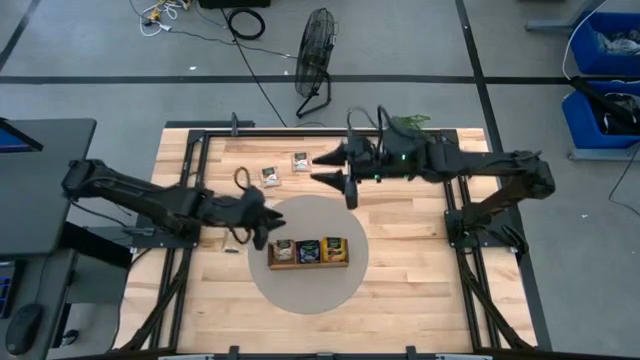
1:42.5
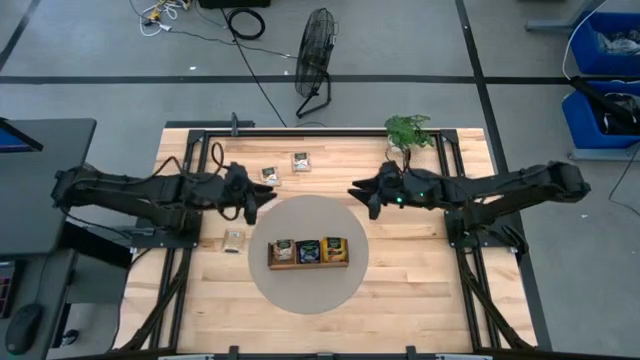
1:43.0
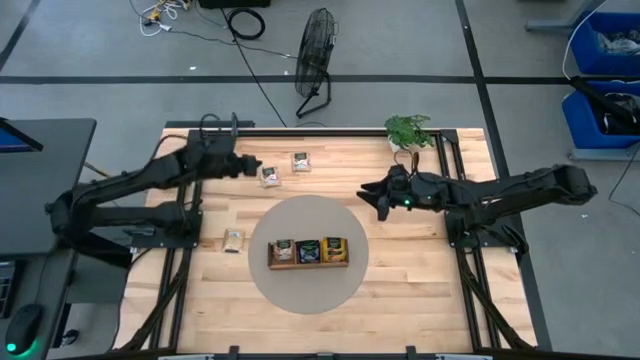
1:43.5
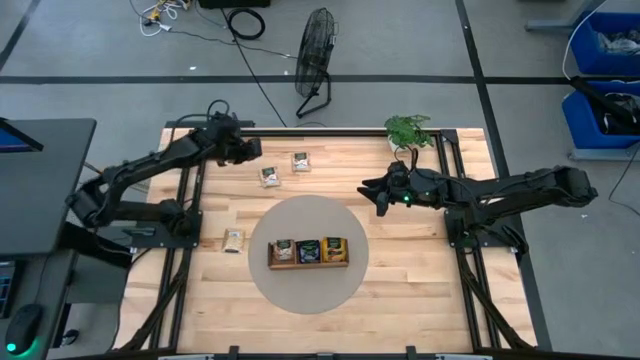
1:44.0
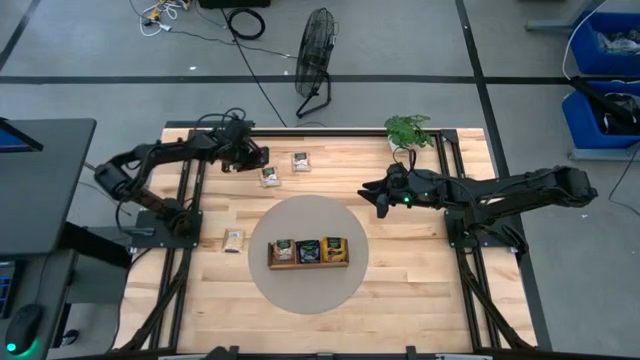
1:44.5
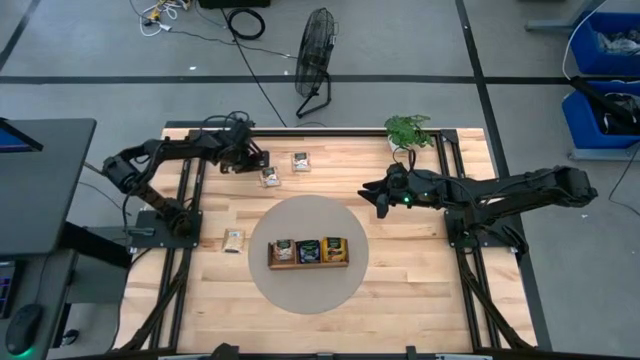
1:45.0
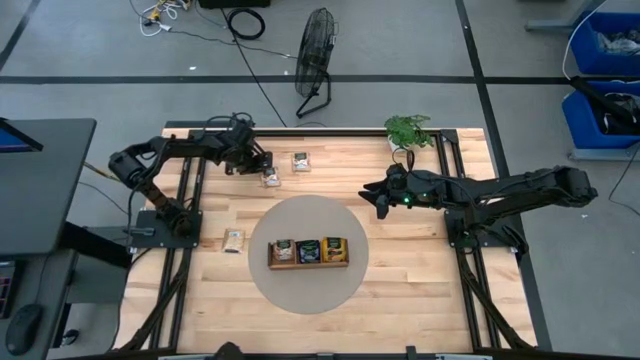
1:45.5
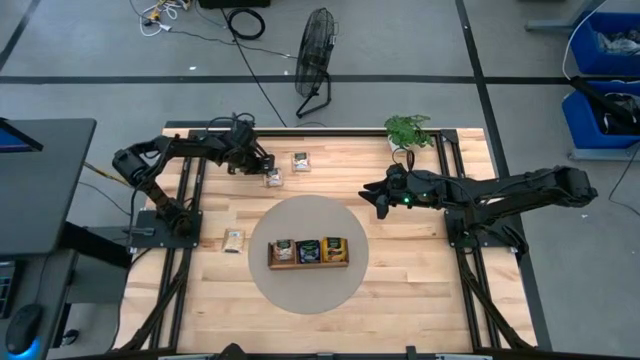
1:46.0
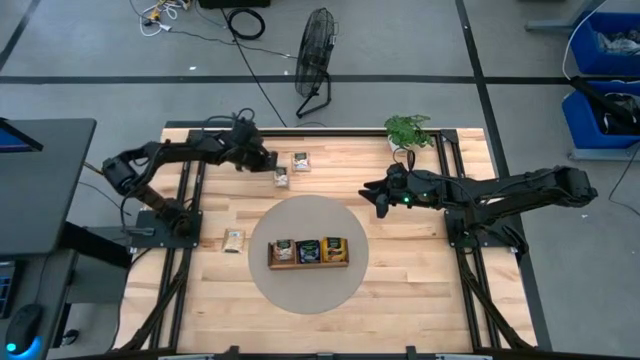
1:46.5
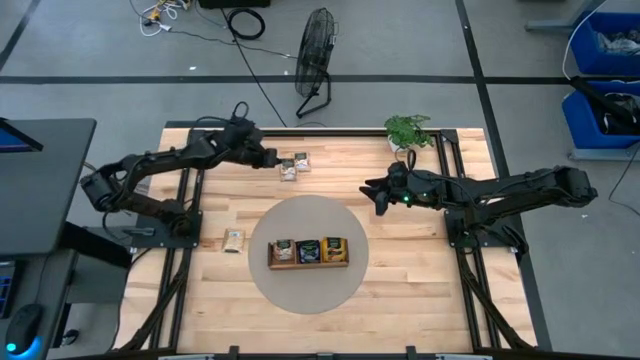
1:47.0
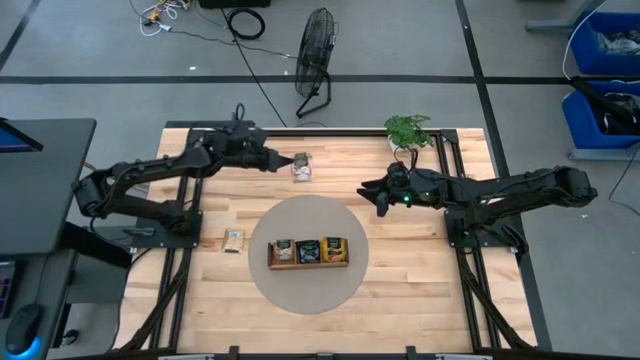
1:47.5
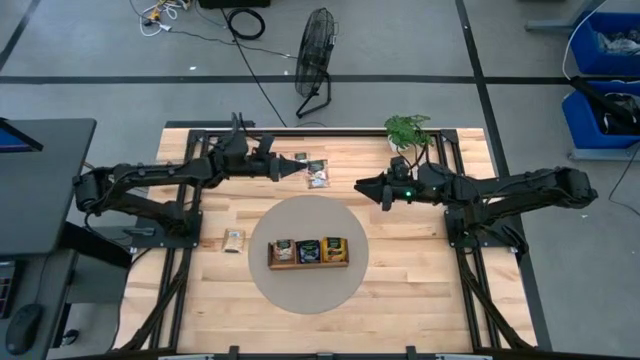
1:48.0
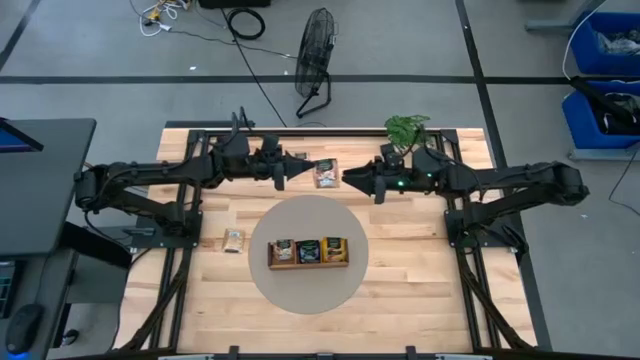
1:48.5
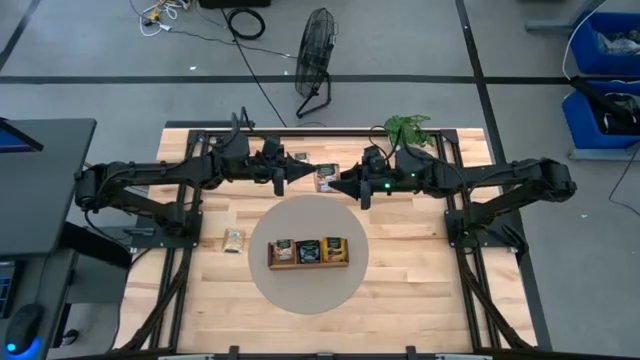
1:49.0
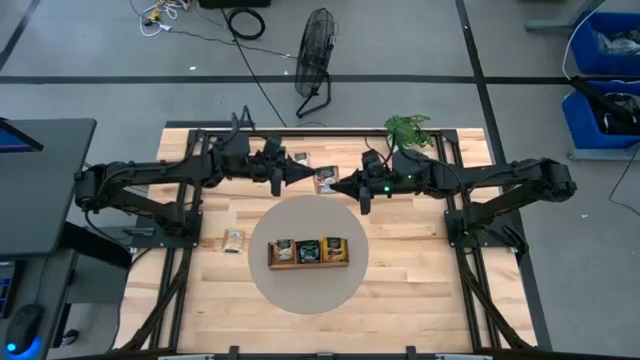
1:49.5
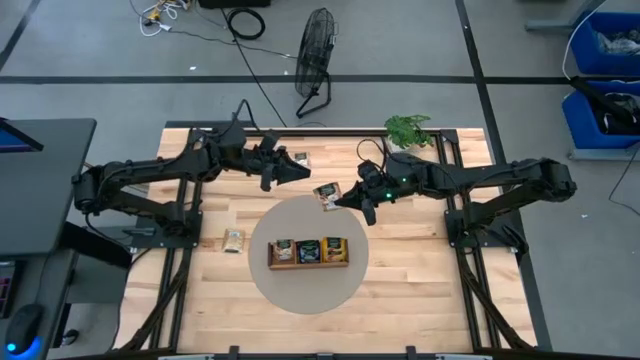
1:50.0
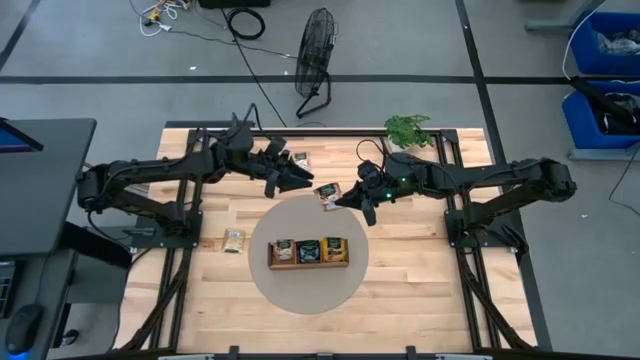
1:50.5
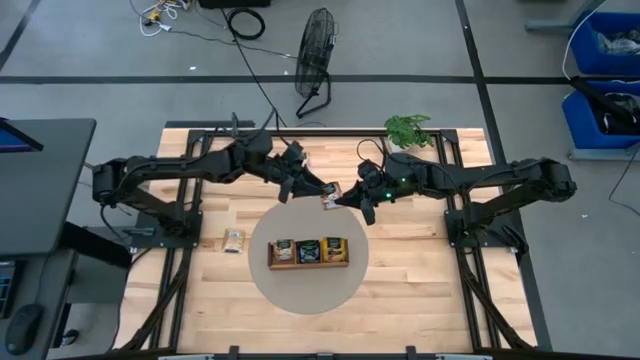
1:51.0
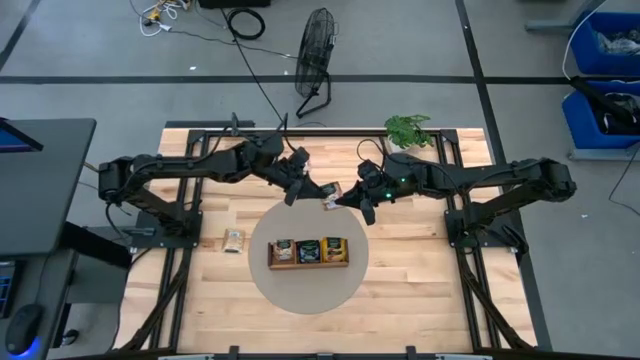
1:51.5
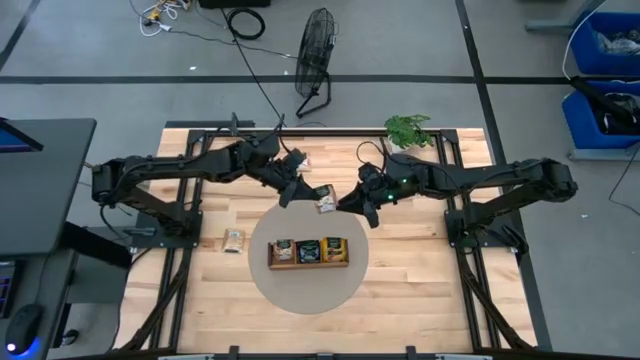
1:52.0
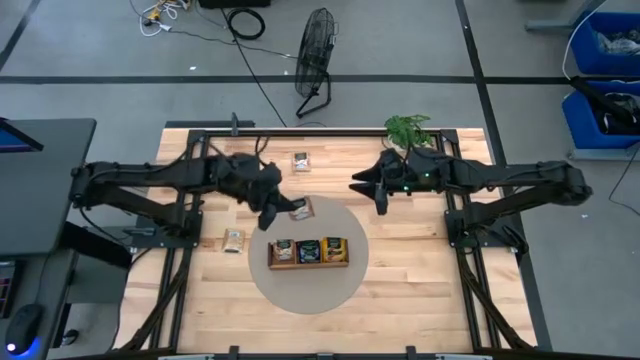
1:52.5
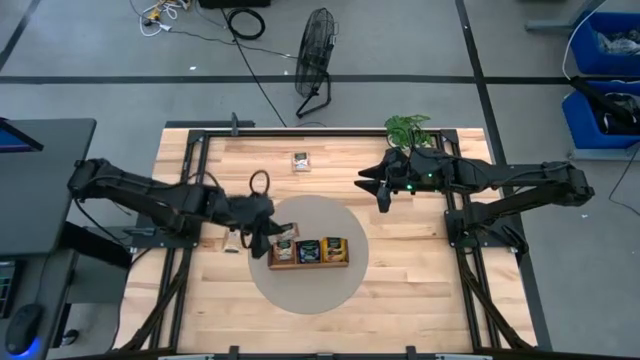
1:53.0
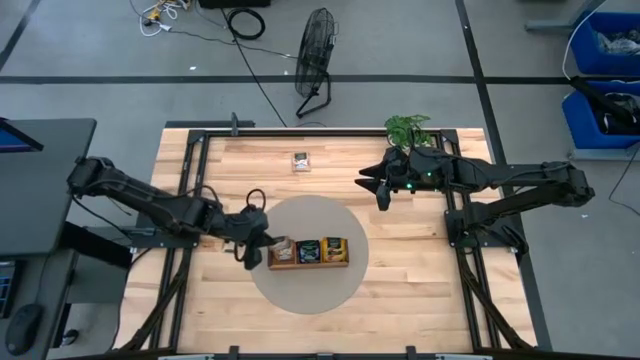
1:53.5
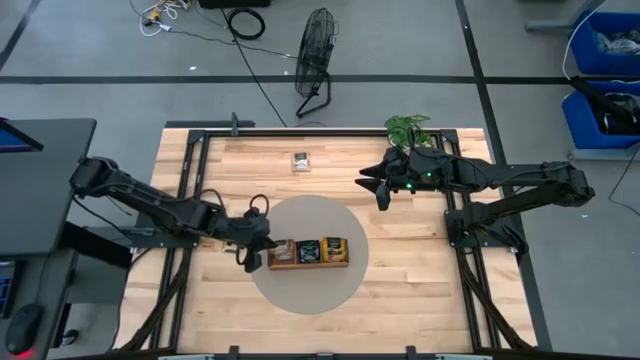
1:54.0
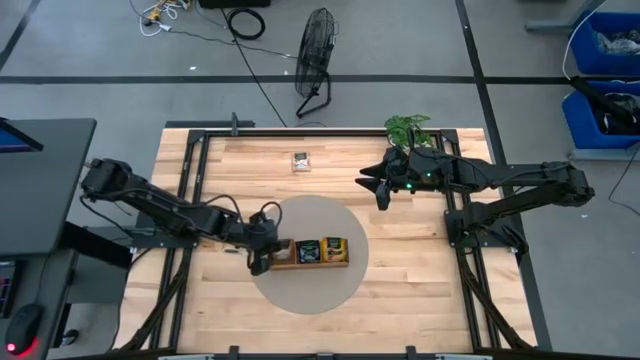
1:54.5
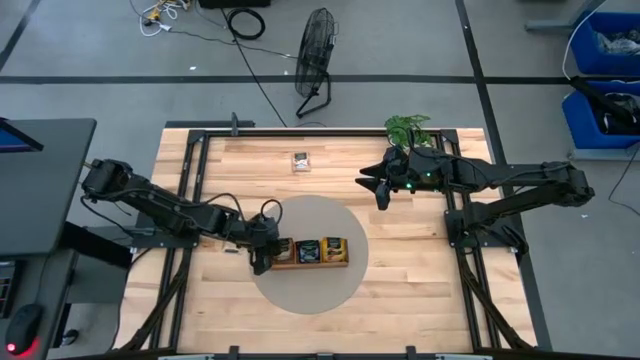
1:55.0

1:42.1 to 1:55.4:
Task: Pick & Place Tea
Put the brown tea bag into the left section of the wooden organizer

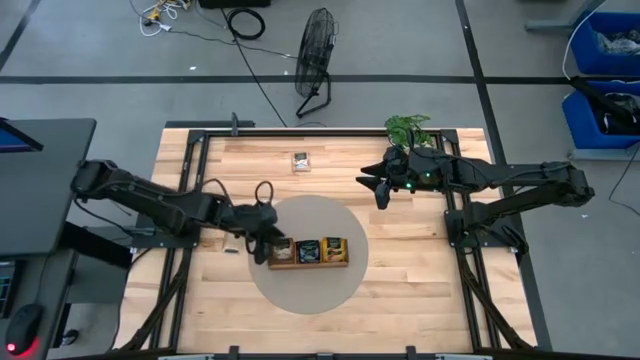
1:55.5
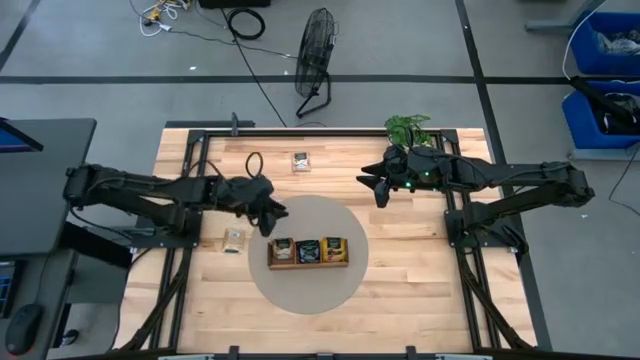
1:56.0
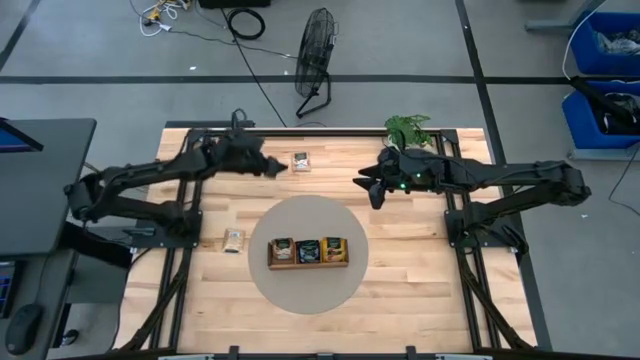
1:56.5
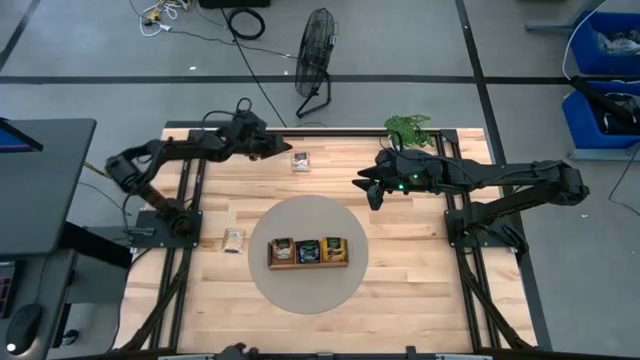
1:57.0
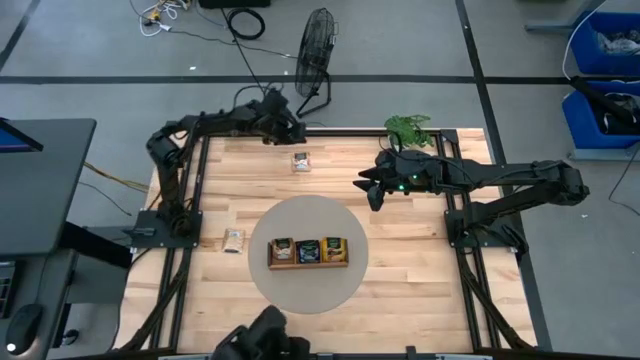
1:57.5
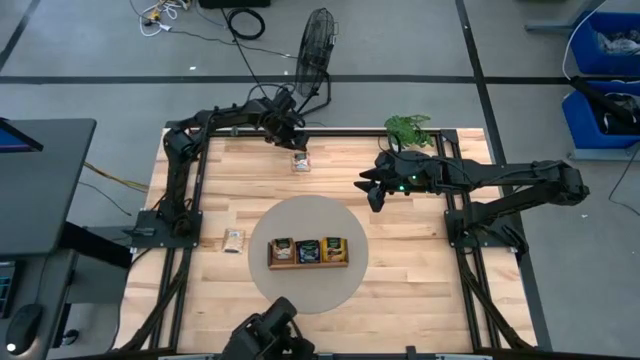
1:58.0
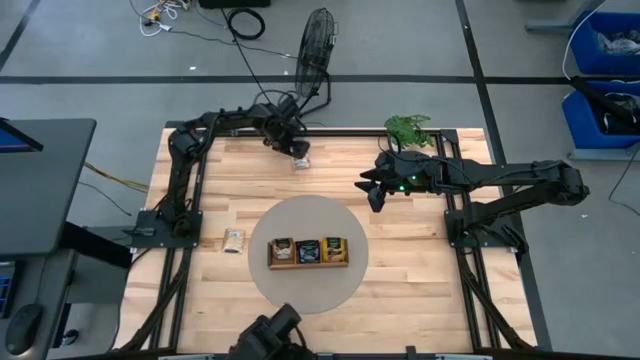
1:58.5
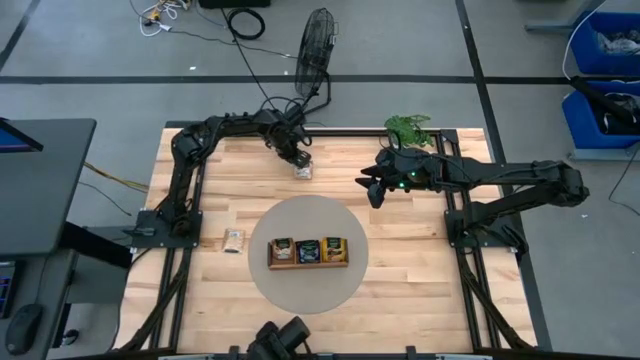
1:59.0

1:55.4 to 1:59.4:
Put the brown tea bag into the left section of the wooden organizer

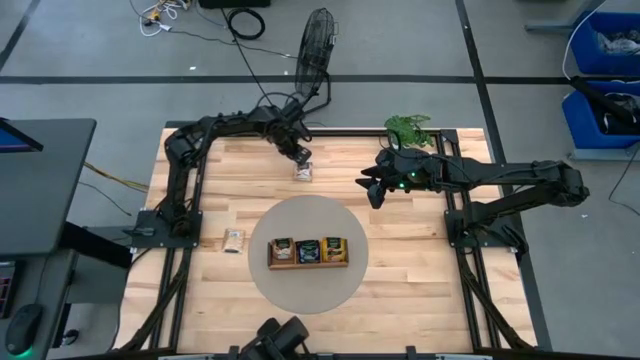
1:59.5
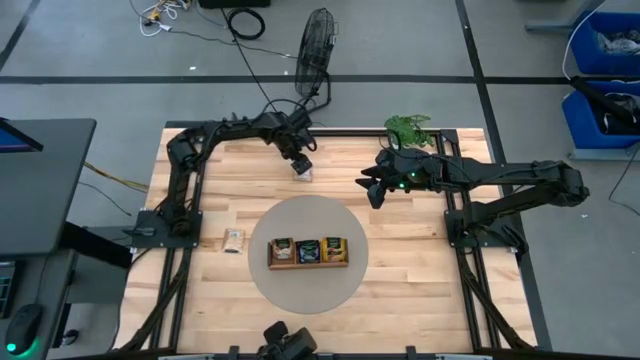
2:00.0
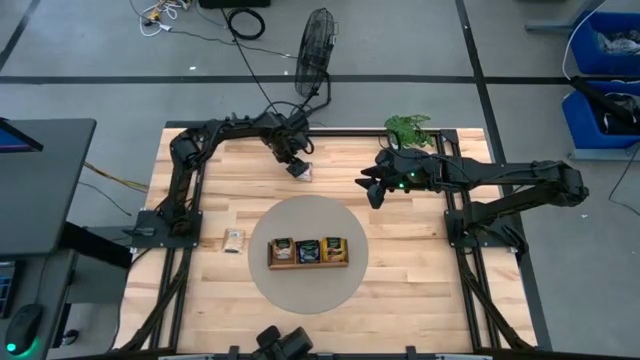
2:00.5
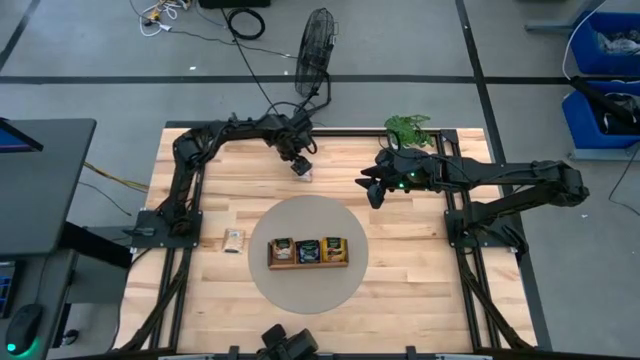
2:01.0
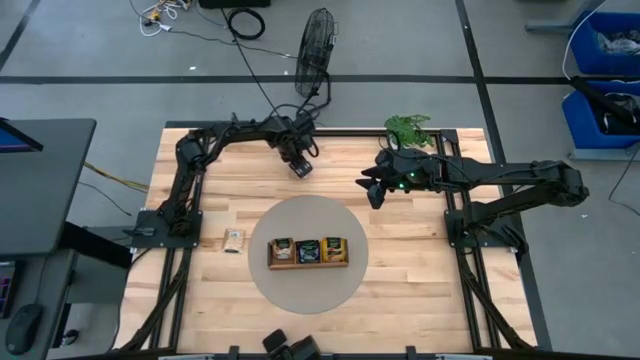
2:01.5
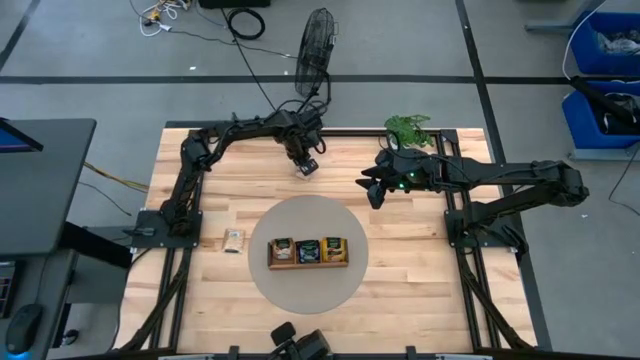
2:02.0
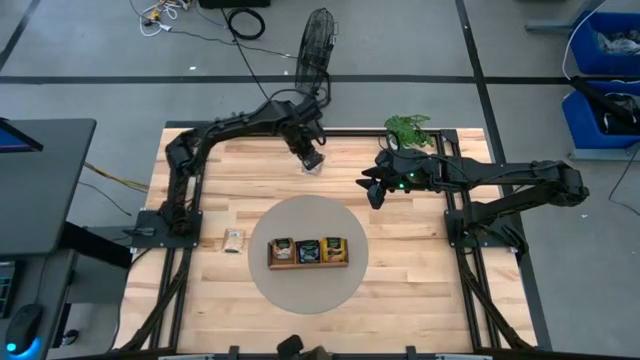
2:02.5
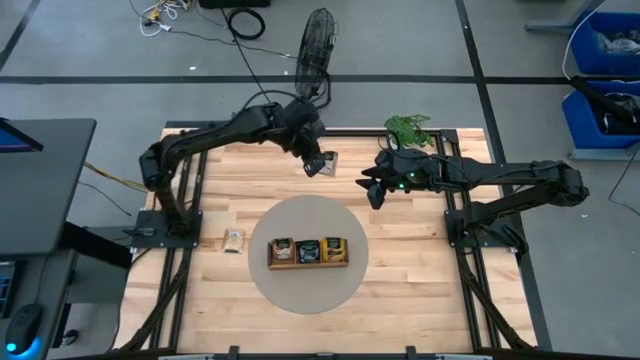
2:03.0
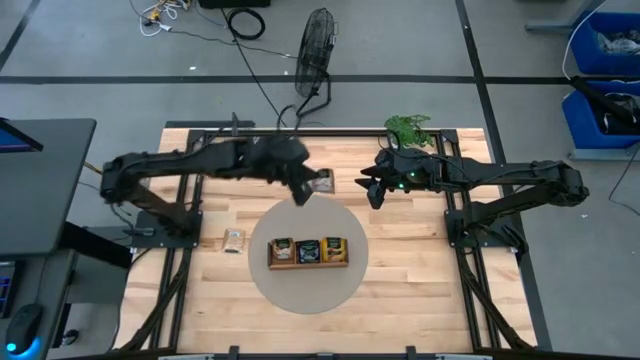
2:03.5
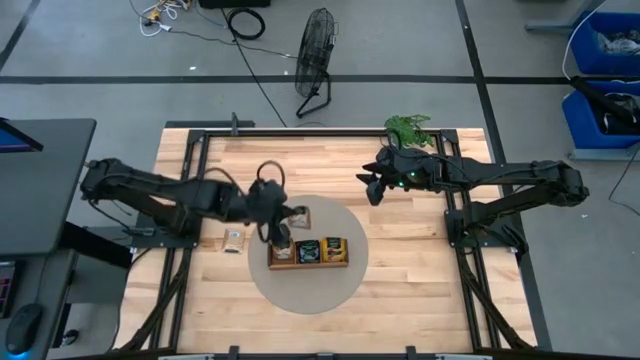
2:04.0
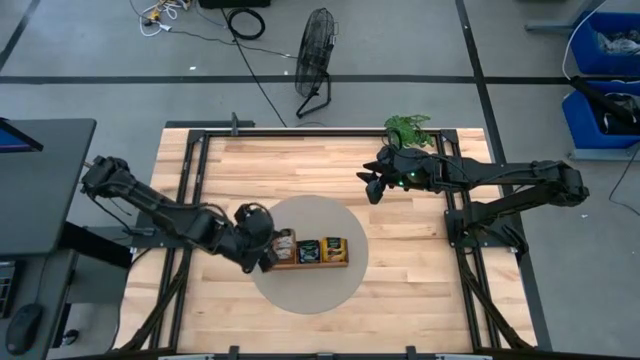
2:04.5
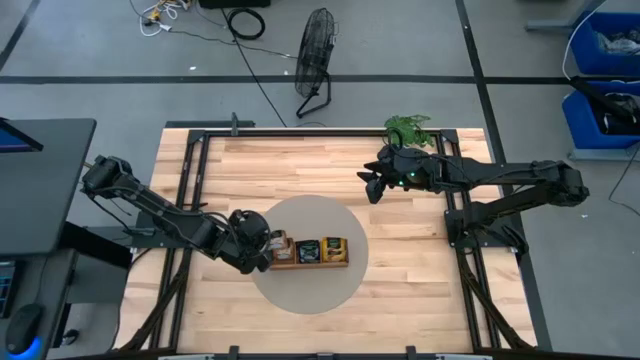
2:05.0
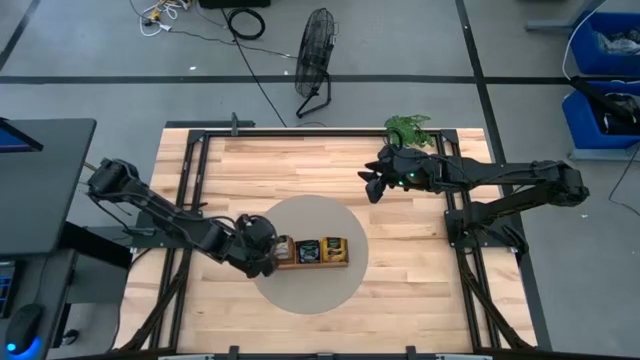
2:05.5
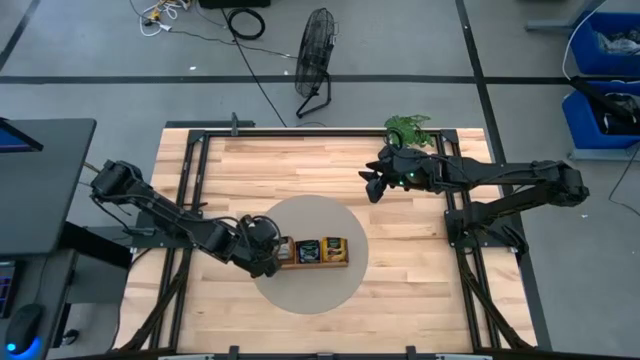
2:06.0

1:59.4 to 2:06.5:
Put the brown tea bag into the left section of the wooden organizer
